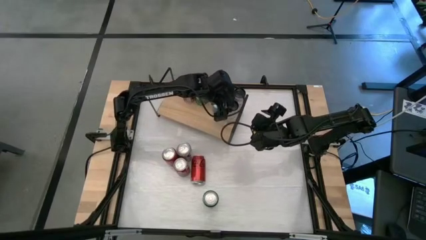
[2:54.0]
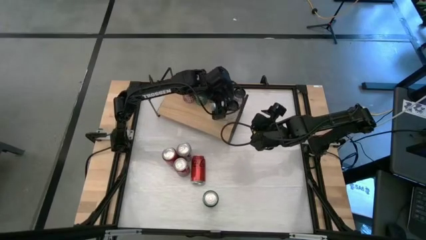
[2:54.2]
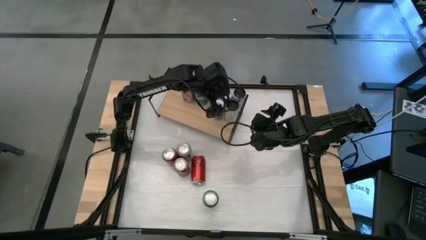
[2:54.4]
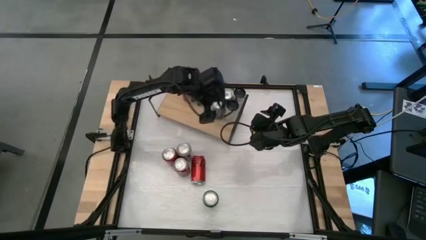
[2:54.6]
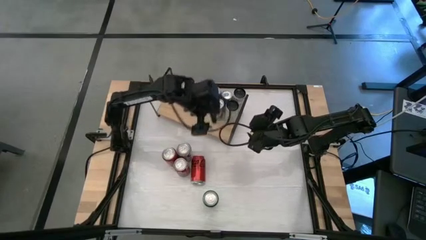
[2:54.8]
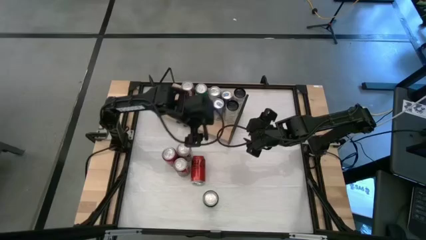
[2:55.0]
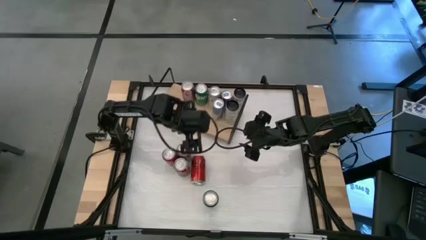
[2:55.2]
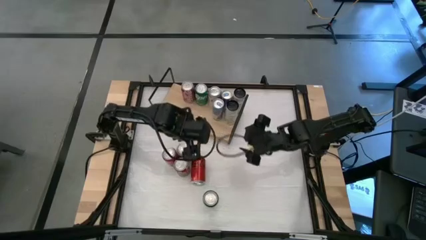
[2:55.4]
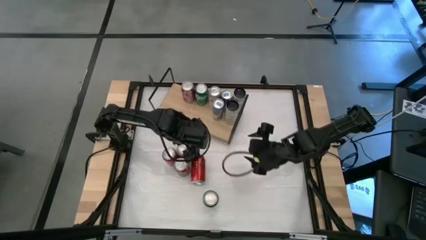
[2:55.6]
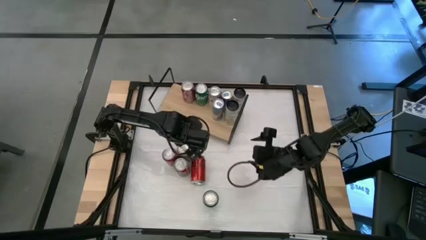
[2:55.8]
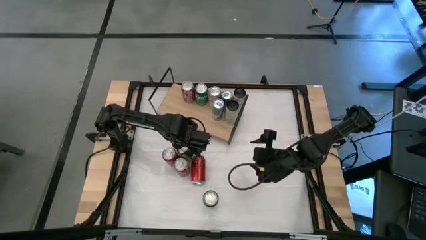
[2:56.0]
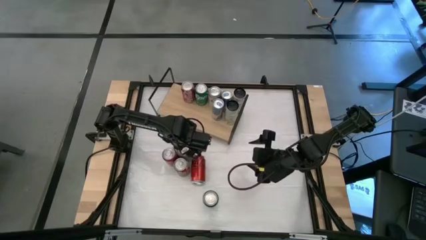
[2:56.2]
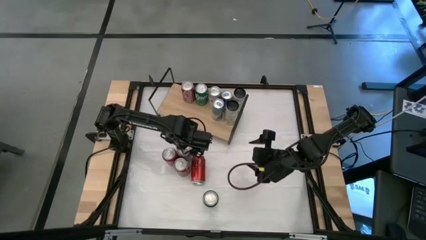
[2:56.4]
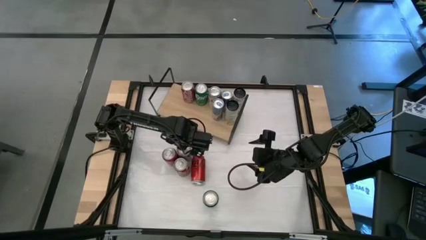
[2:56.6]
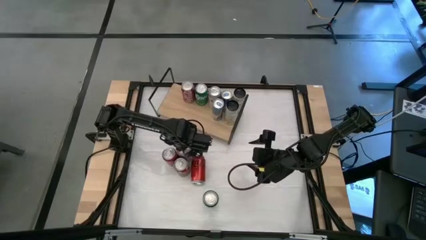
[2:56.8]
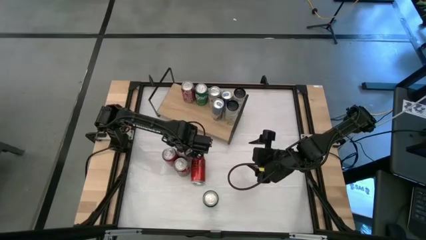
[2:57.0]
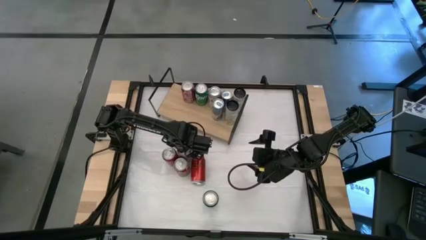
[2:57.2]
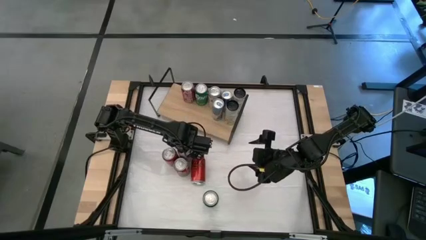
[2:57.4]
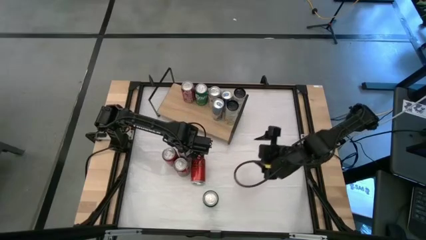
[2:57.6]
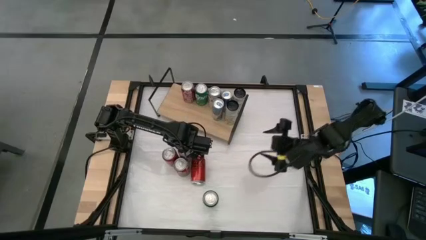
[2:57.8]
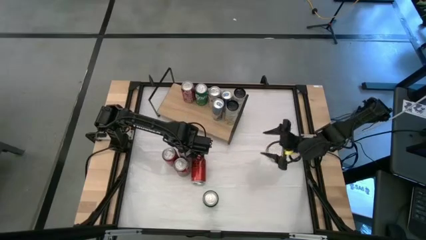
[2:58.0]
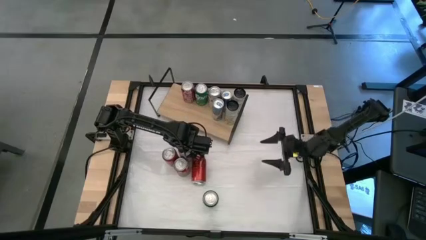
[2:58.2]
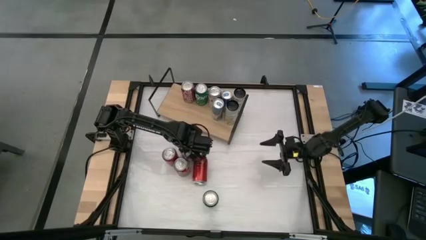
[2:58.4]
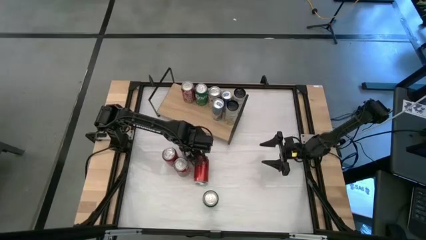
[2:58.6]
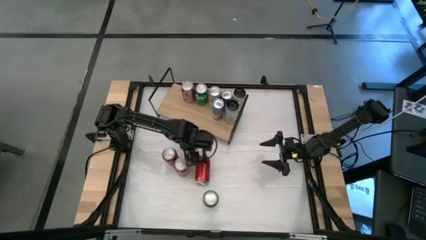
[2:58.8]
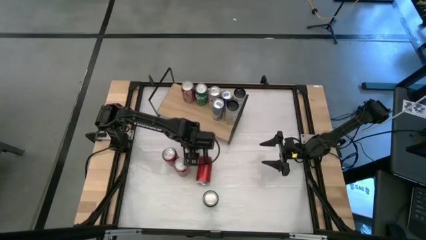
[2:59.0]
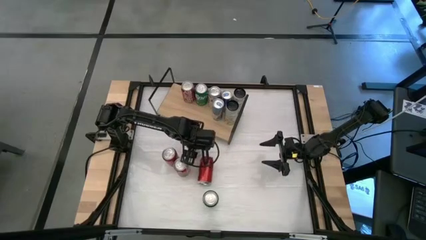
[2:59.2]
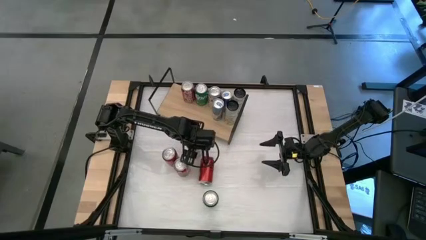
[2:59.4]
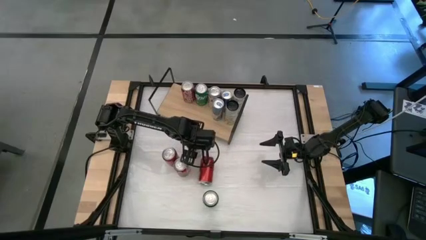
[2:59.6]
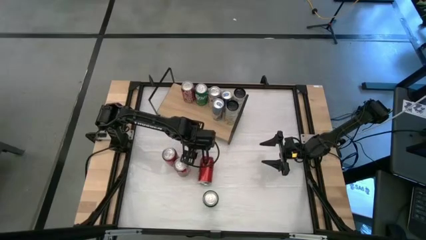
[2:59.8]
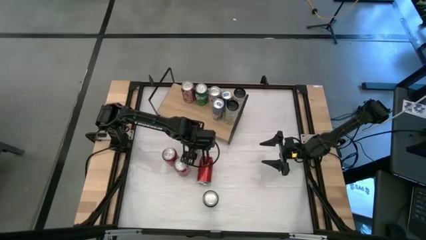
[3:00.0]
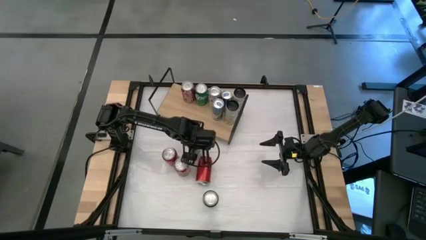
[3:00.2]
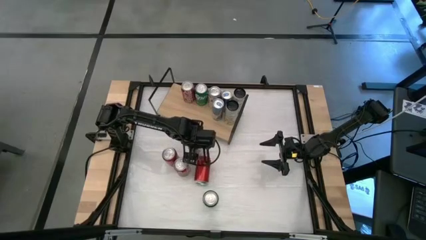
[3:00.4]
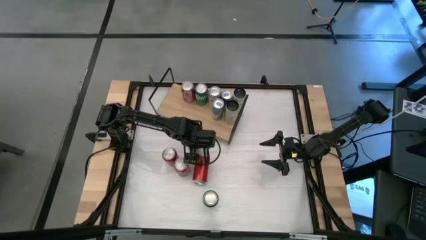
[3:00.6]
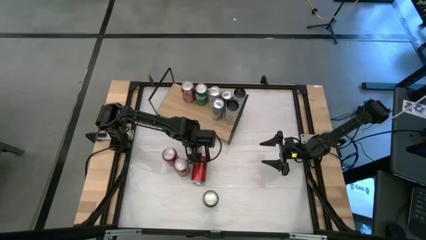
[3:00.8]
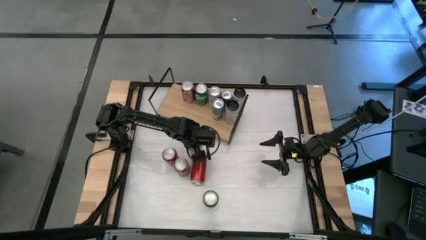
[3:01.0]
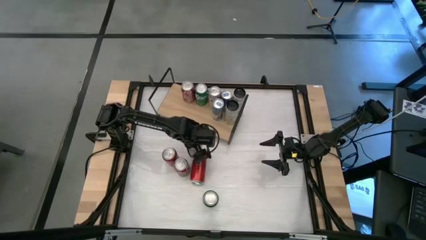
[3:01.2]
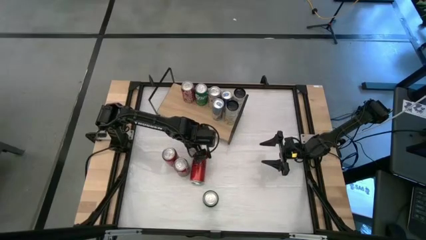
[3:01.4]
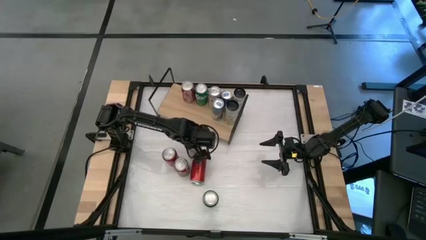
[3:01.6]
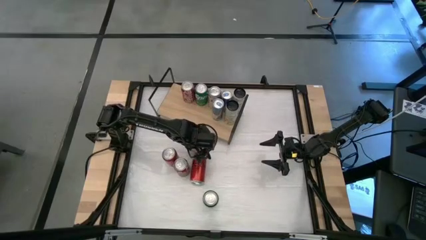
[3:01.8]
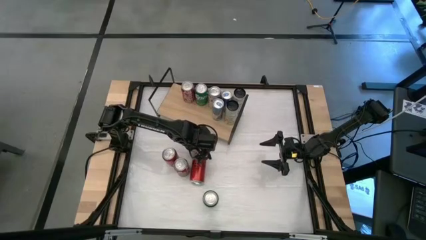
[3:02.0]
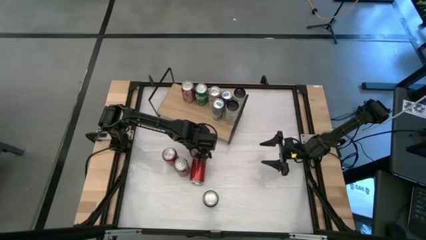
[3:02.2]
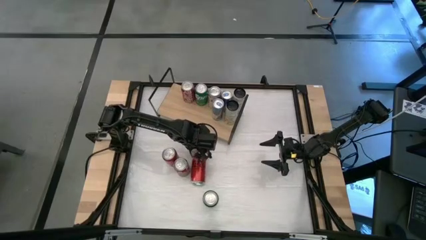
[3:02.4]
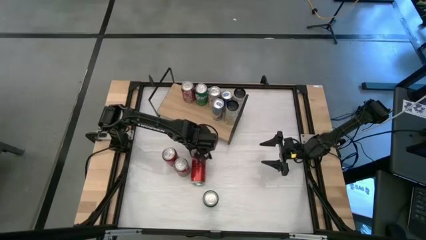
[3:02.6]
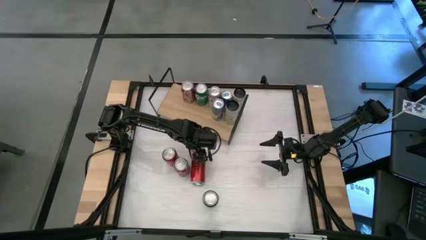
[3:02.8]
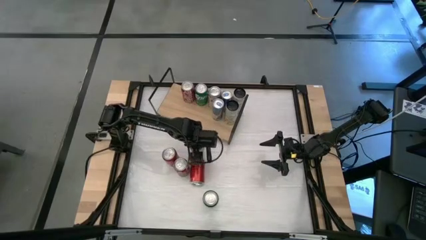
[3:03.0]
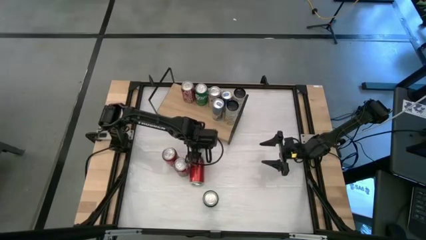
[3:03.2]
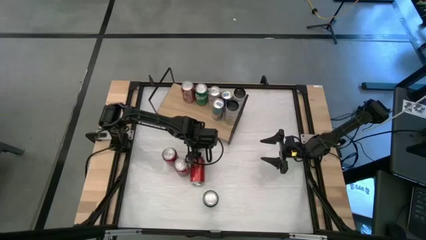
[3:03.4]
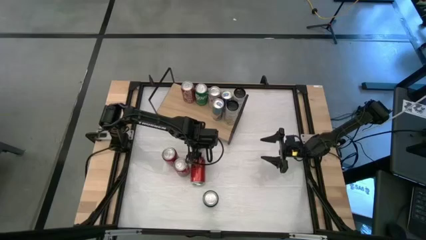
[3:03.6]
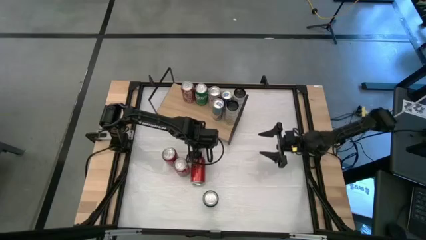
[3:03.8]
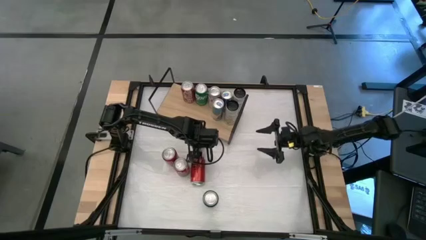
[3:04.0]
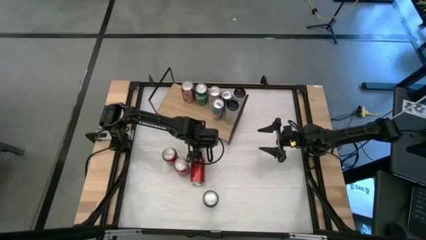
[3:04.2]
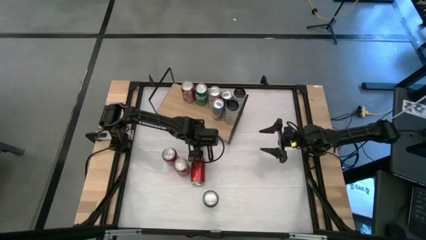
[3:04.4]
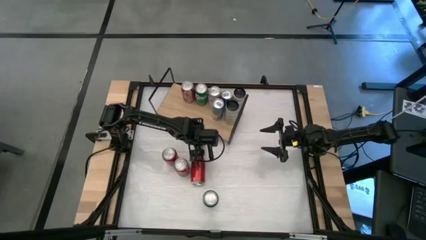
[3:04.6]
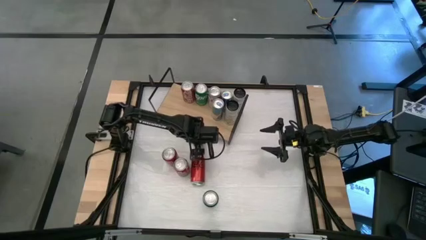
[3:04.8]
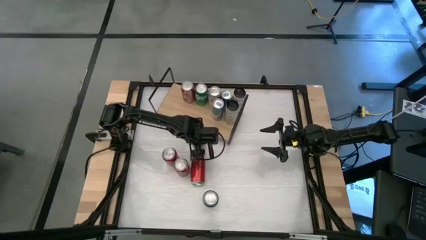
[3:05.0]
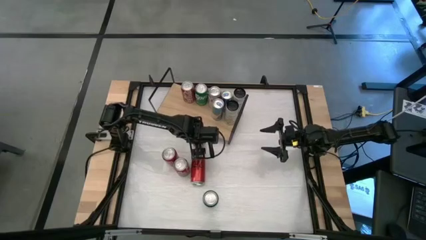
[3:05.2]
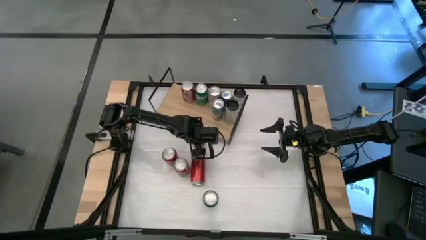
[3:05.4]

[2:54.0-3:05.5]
Task: Place canned beverage on shelf
Put the silver soda can on the shelf aligned with the other silver soda can

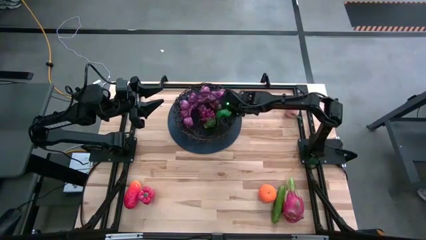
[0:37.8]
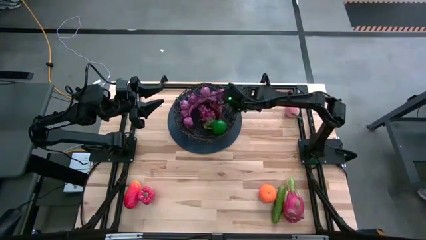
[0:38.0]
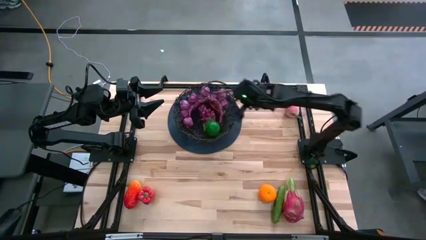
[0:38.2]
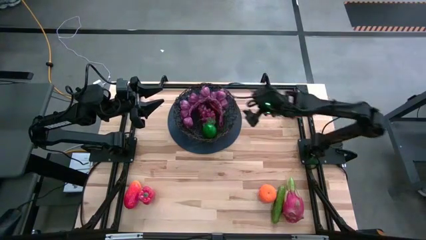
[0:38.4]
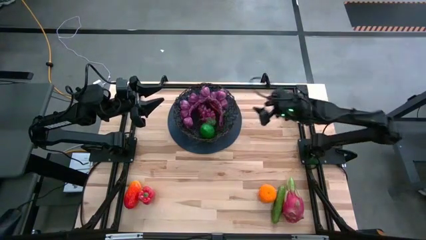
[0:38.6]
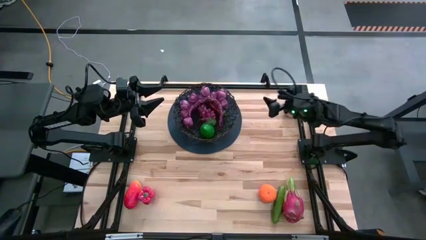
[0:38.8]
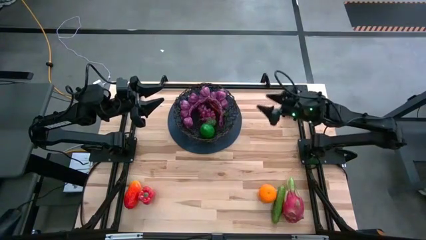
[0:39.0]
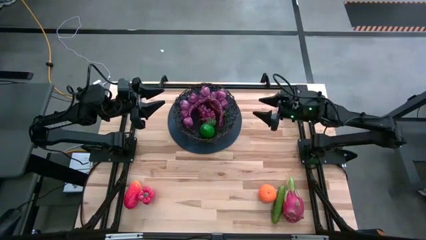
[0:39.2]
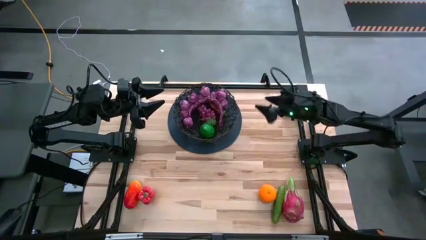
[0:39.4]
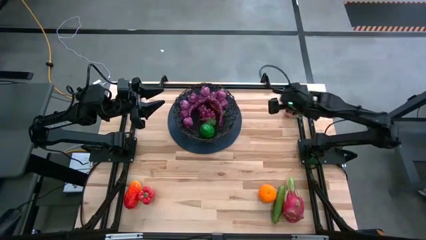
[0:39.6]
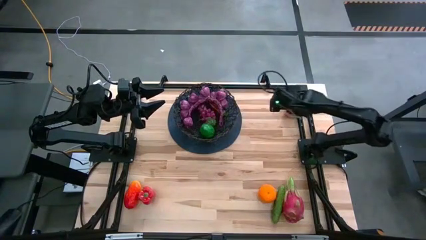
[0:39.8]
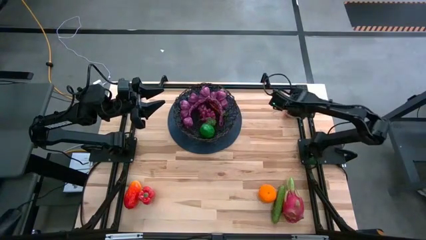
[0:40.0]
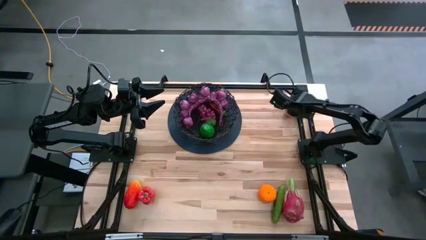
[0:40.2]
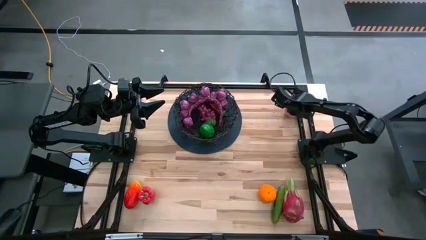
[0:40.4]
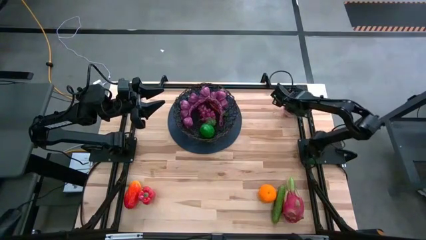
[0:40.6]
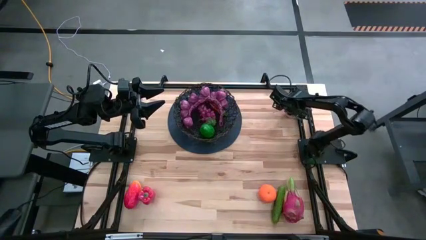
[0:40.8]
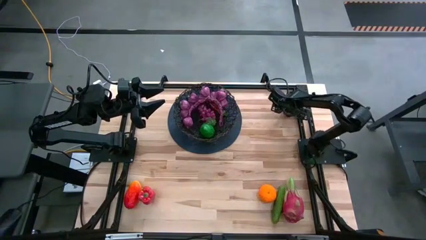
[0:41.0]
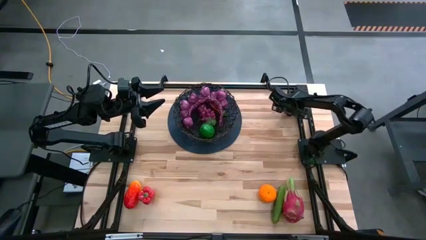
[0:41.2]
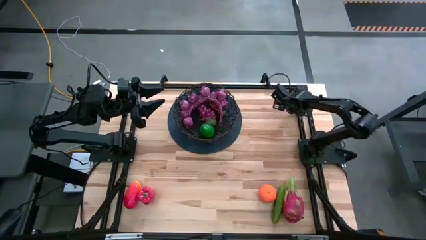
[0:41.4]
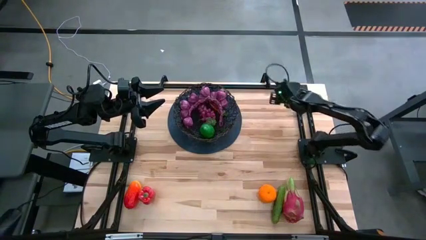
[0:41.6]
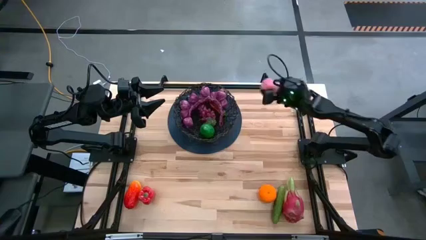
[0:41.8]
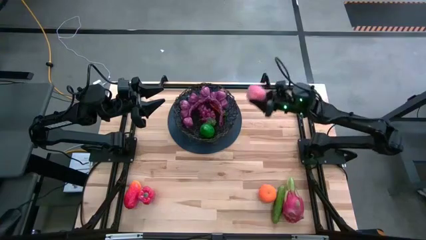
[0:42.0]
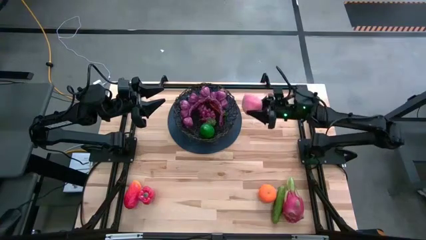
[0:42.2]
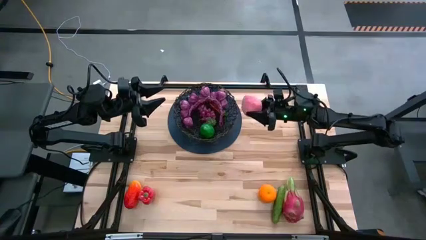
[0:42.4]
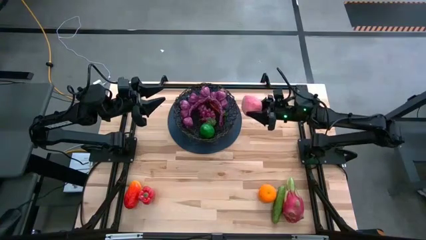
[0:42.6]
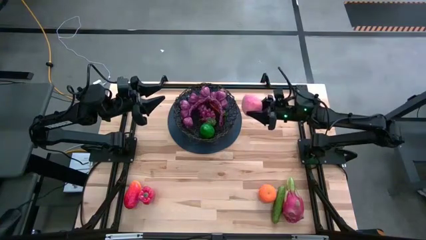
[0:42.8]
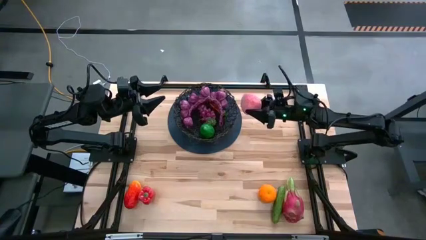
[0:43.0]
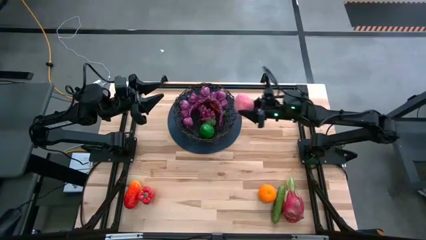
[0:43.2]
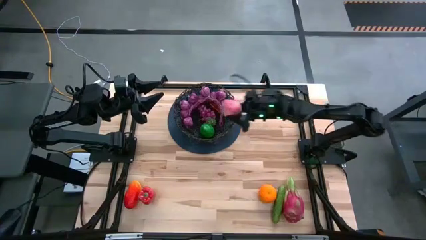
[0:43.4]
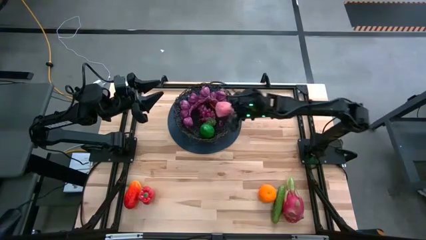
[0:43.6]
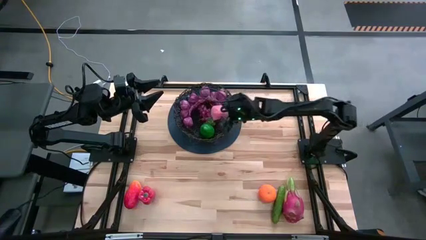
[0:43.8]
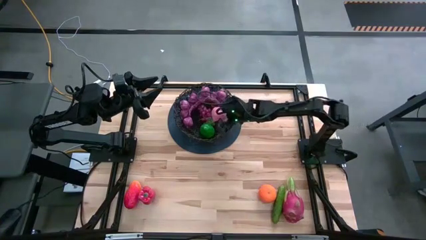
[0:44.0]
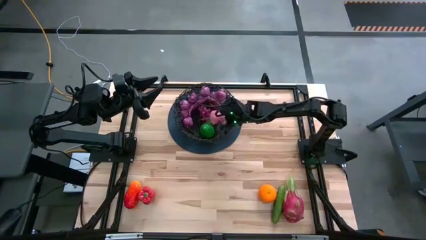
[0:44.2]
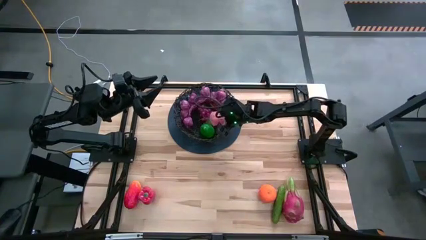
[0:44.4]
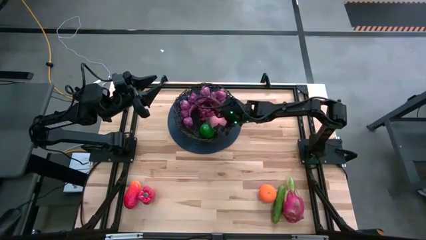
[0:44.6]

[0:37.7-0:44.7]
Task: Build produce basket
Put the peach into the wire basket
